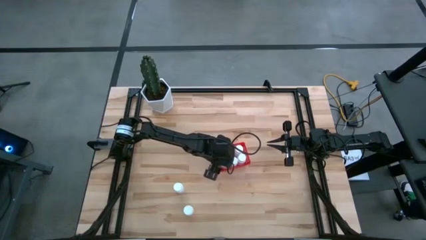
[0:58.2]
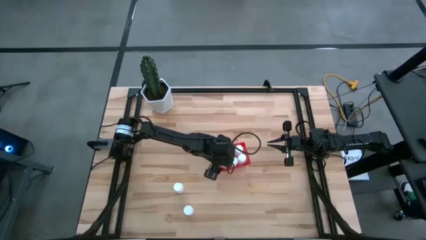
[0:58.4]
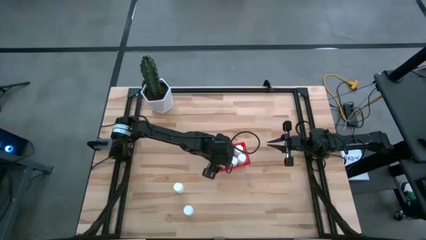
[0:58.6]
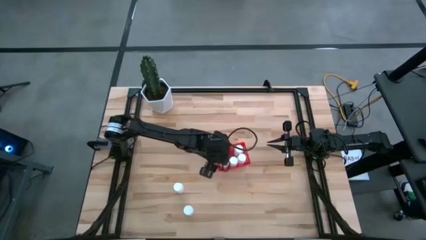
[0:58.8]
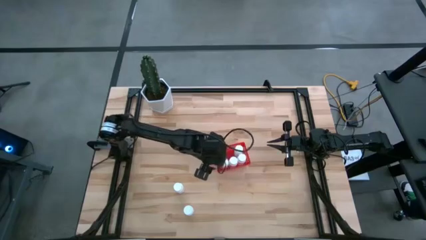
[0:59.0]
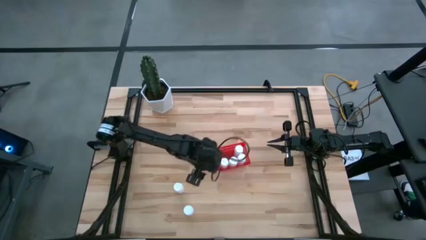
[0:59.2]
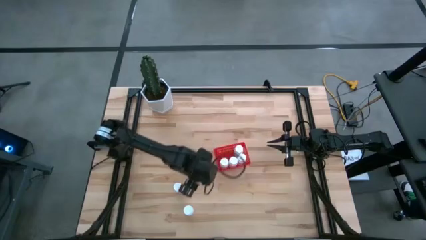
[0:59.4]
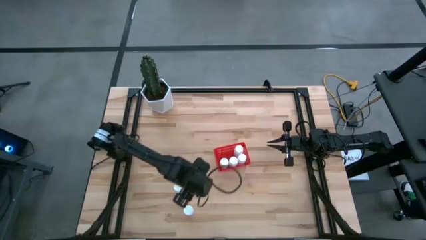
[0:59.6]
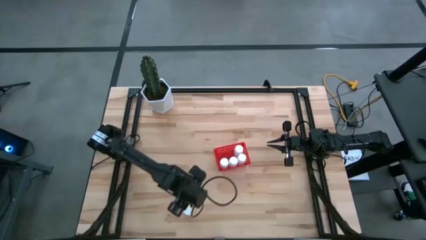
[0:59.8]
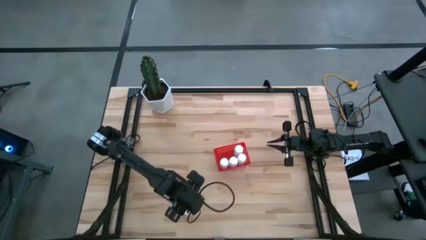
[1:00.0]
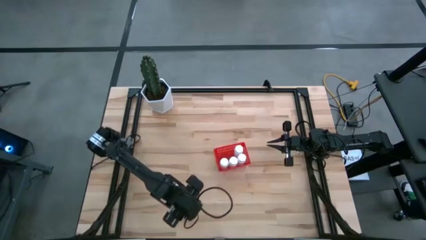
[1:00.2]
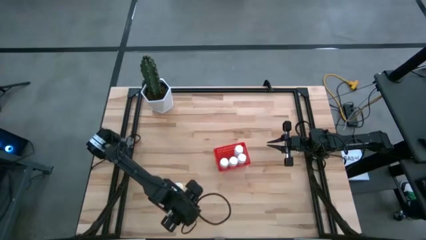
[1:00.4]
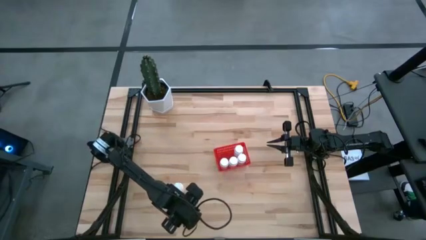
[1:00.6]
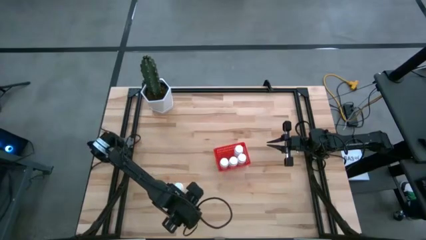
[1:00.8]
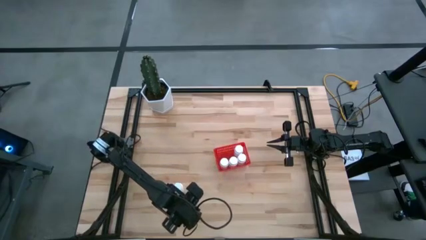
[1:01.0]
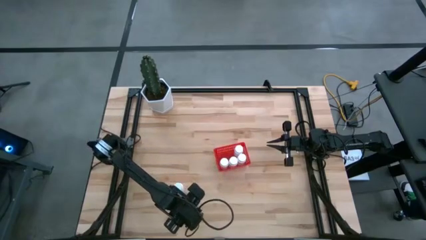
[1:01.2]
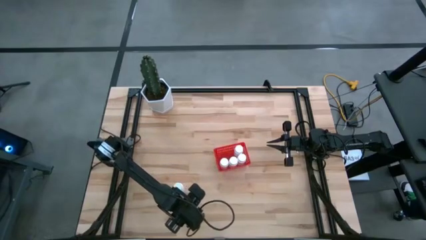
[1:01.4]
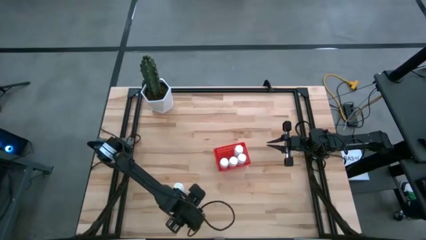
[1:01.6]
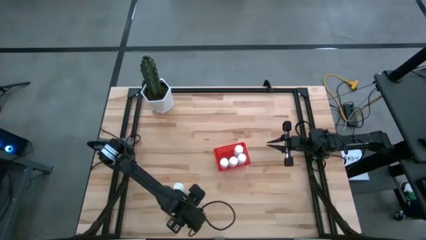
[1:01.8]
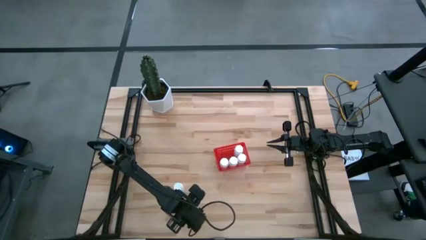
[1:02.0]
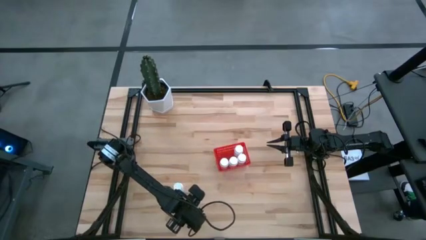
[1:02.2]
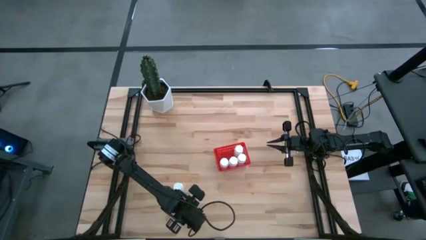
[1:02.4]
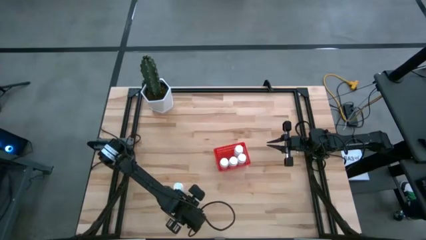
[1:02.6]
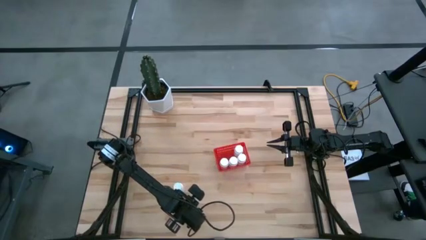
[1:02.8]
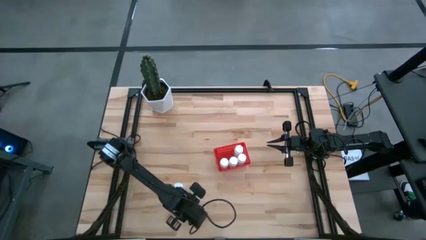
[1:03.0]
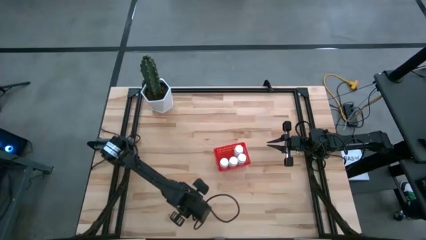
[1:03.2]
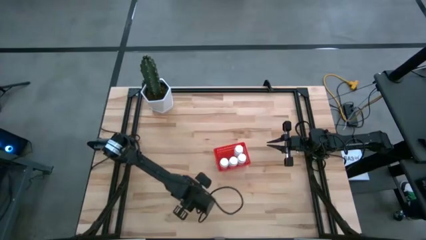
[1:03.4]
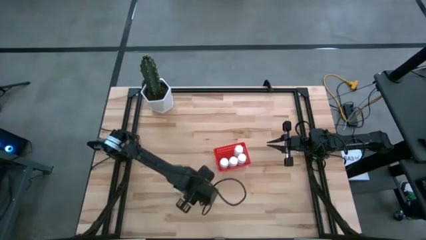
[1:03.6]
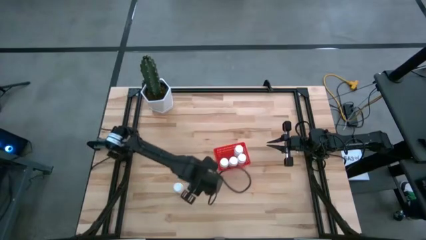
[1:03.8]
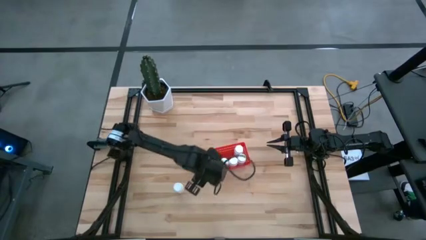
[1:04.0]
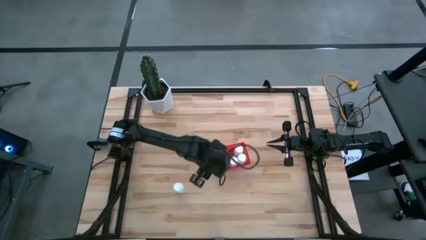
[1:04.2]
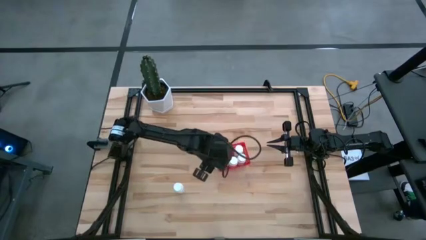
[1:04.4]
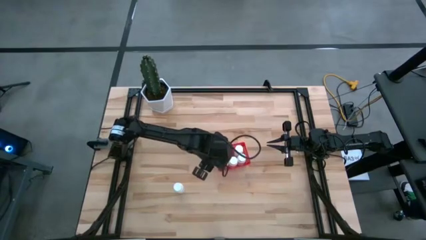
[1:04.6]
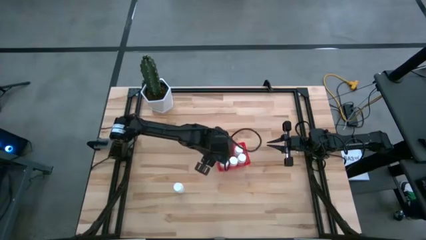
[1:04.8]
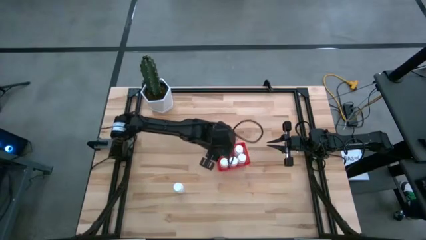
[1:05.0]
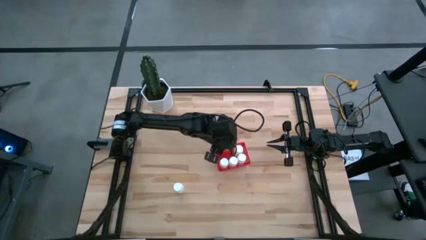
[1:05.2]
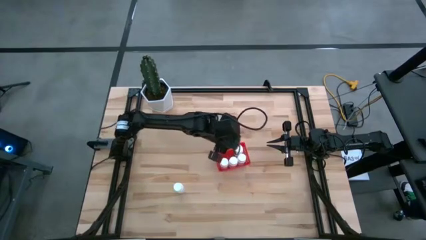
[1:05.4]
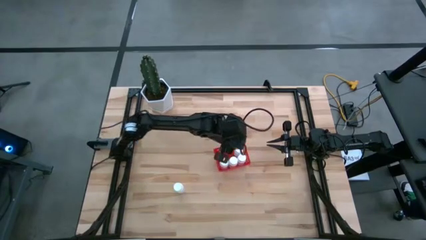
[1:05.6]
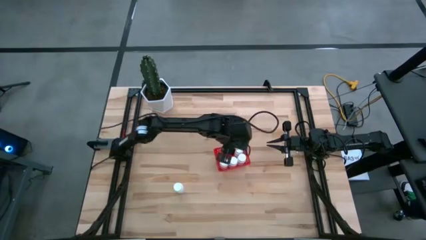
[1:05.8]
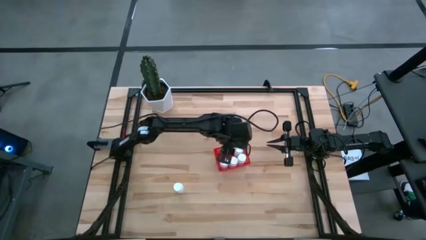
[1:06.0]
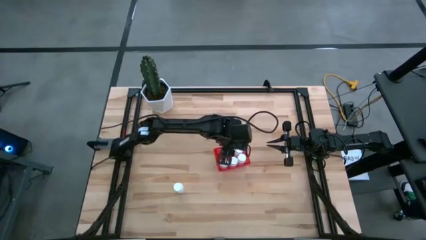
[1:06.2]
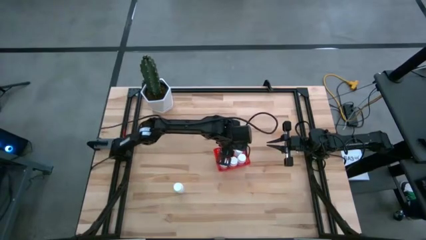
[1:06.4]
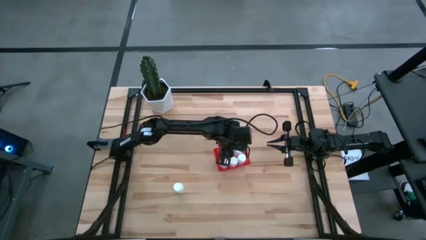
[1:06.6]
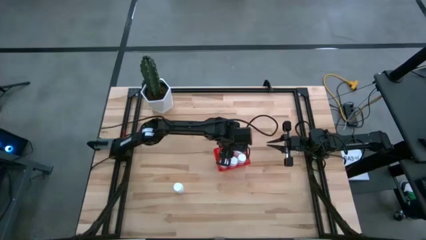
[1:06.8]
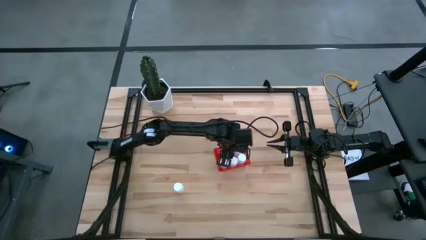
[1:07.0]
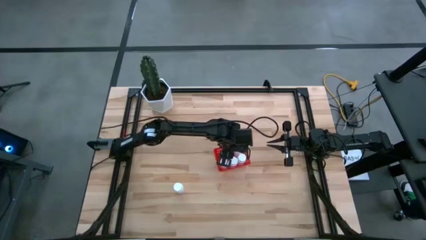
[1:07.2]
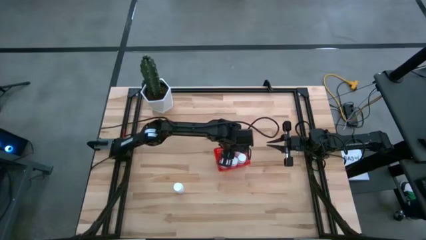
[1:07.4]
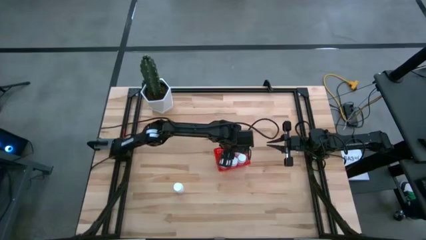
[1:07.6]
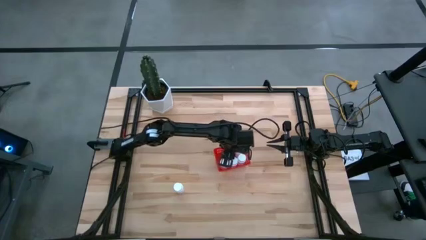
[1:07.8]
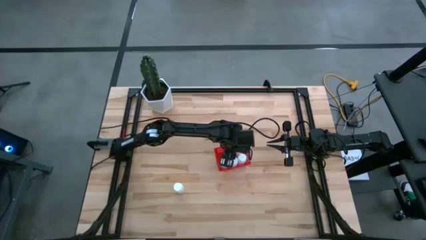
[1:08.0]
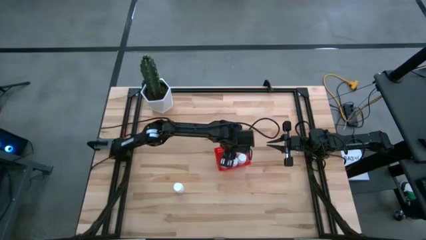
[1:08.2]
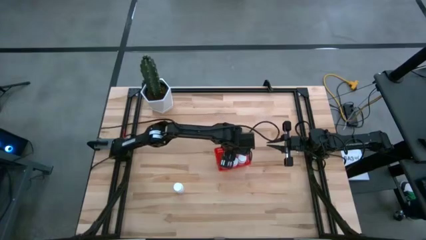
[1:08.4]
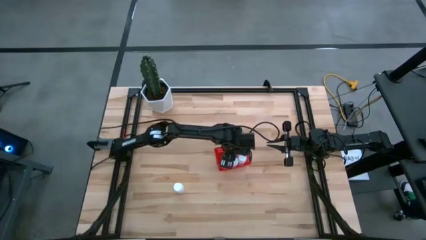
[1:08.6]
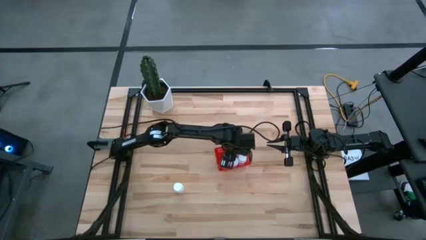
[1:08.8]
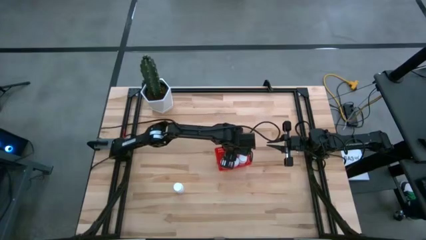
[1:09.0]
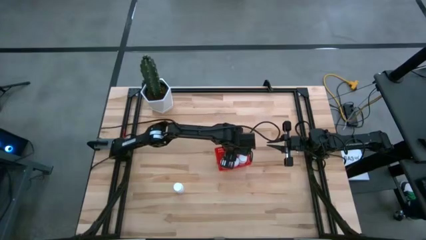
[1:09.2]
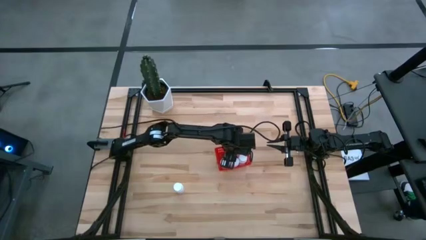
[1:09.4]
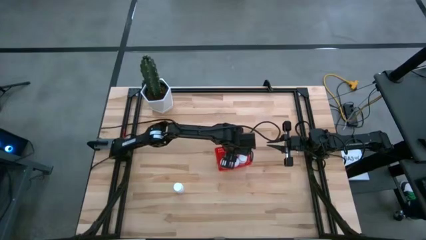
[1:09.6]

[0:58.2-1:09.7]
Task: Pick and place pill bottles into a basket
Put the white medicine bottle into the red basket

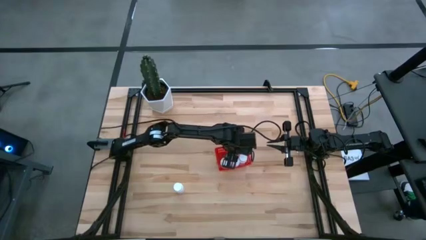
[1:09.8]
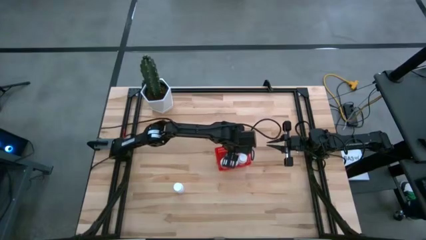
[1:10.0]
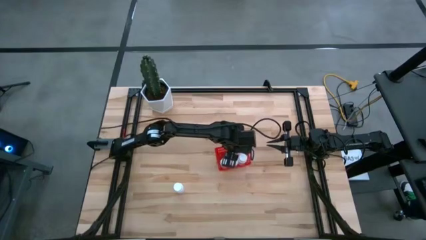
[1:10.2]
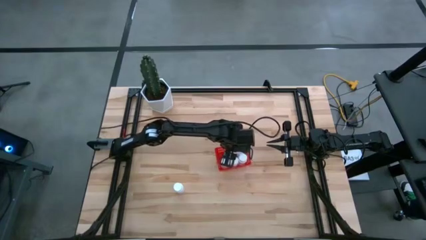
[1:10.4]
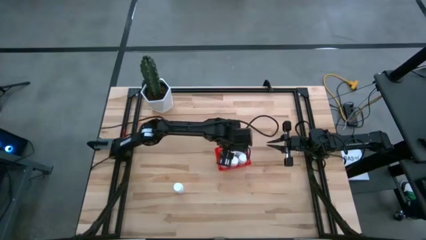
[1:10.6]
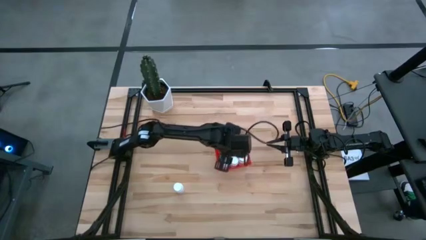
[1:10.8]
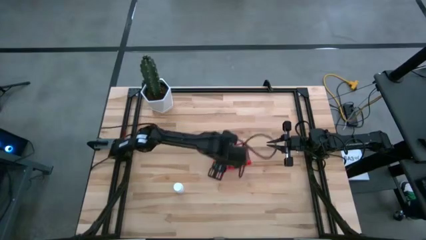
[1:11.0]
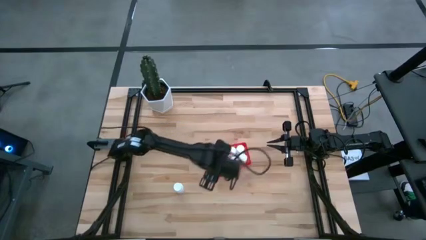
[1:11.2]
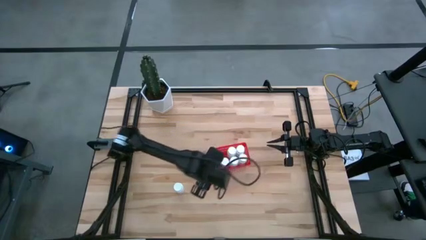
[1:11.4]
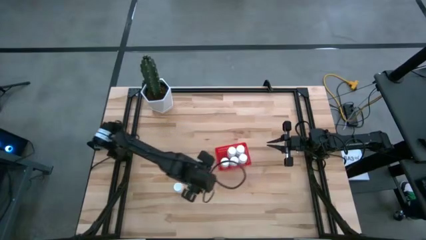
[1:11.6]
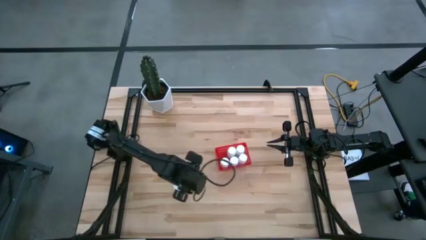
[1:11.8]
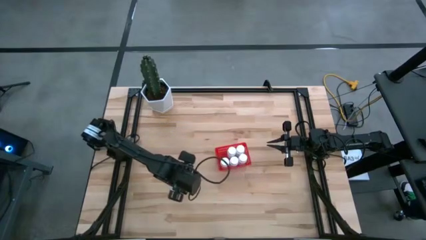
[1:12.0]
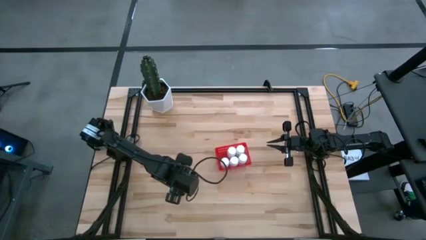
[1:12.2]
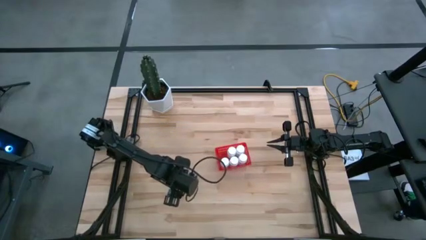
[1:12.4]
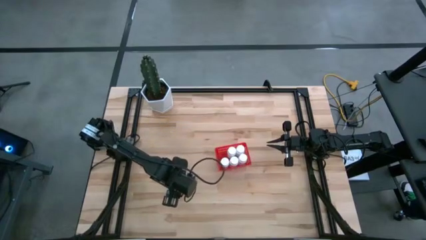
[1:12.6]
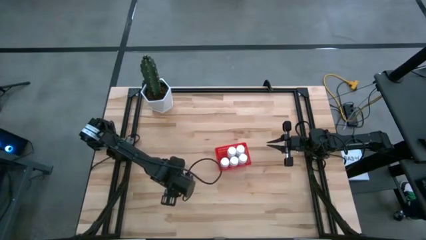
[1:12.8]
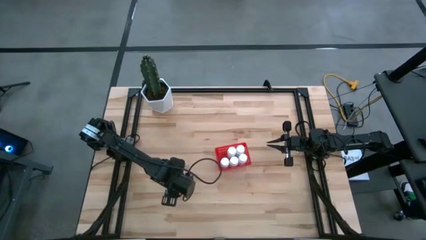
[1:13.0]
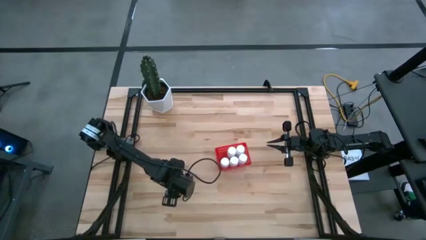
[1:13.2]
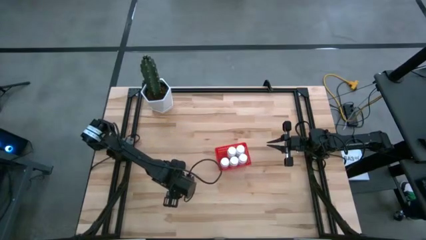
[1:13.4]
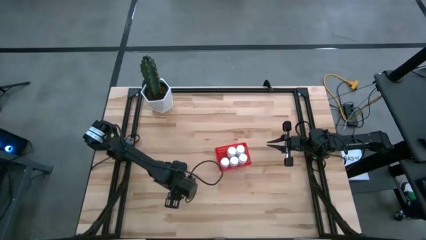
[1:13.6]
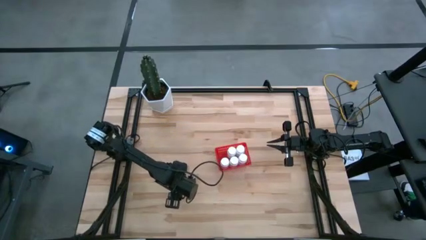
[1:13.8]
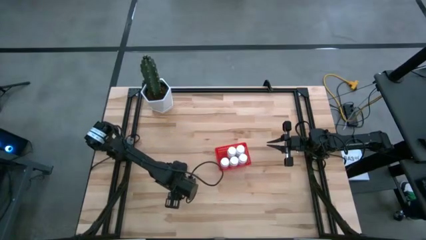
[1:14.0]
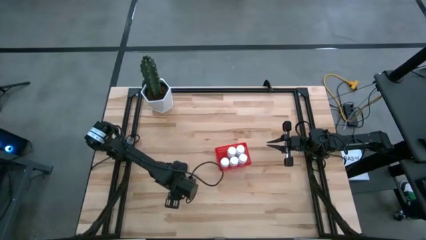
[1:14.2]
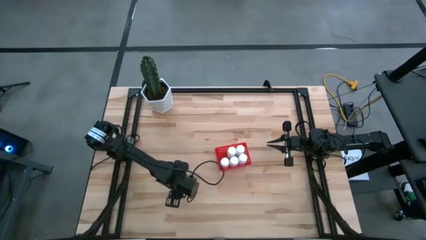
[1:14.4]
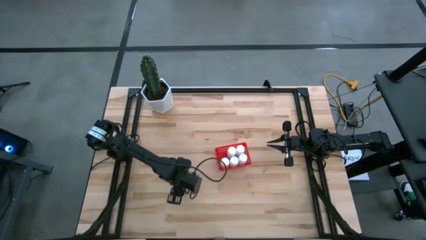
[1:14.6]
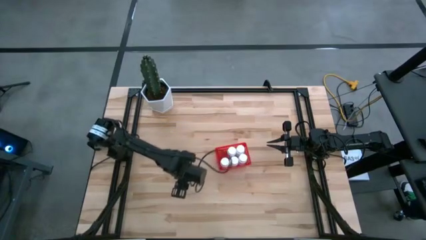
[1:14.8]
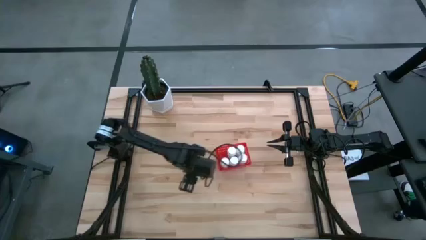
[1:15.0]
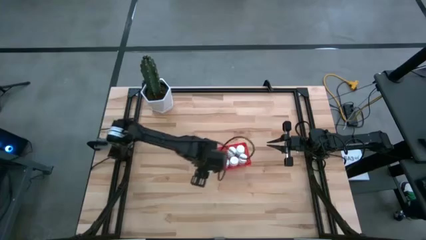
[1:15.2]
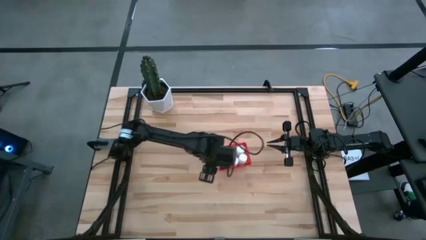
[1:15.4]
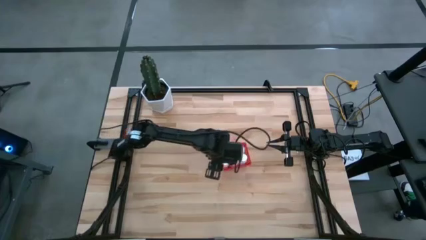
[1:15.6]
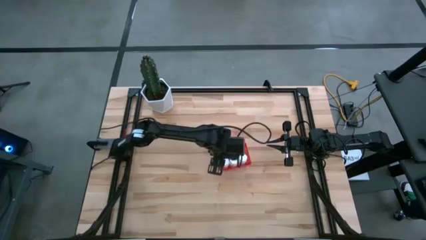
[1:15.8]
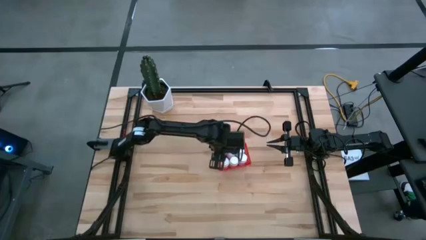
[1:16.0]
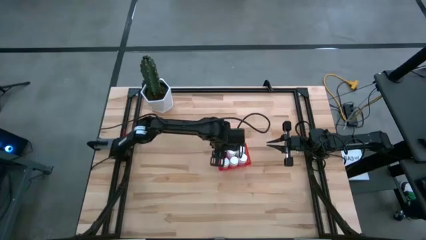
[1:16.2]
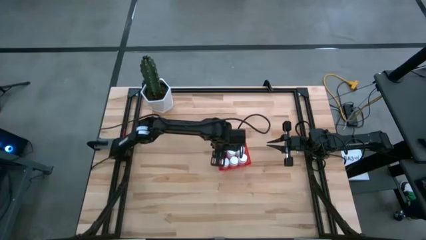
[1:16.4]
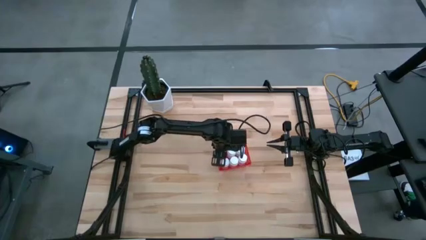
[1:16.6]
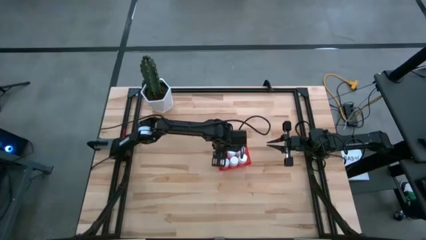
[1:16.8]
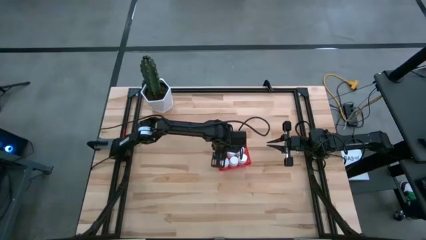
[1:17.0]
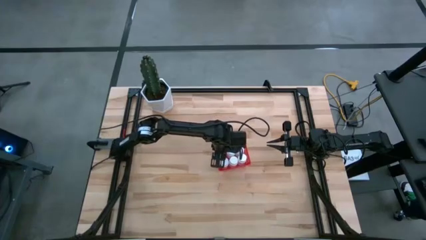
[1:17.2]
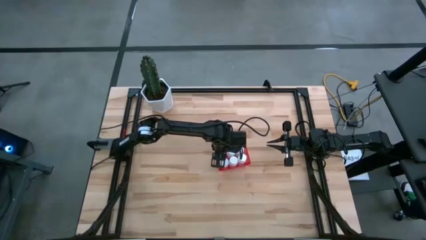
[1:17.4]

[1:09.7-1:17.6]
Put the white medicine bottle into the red basket
